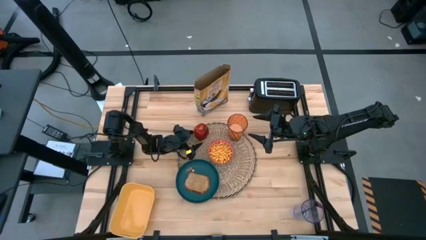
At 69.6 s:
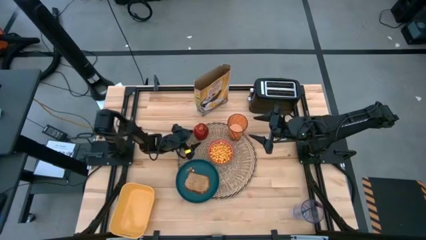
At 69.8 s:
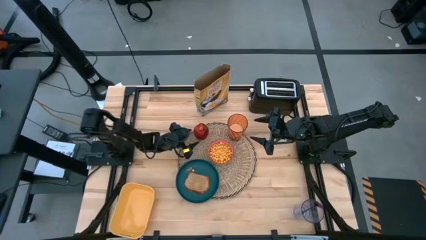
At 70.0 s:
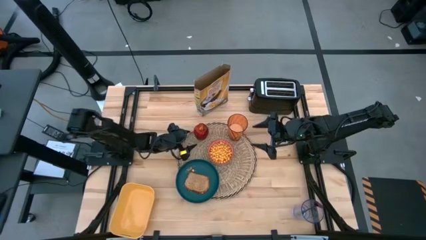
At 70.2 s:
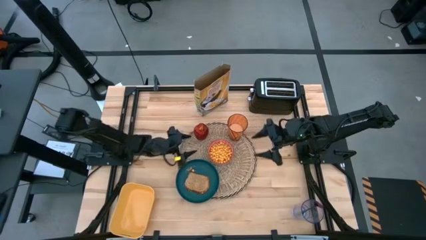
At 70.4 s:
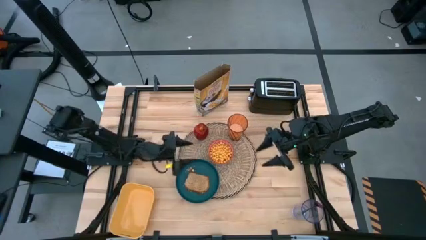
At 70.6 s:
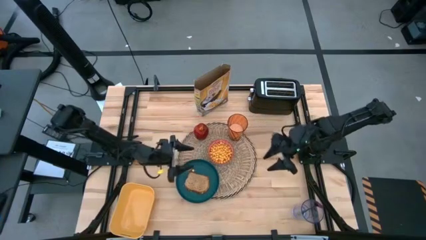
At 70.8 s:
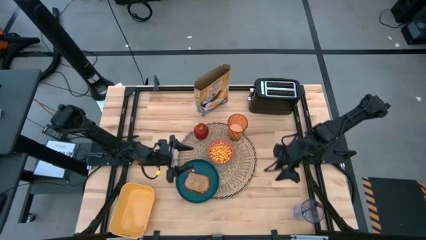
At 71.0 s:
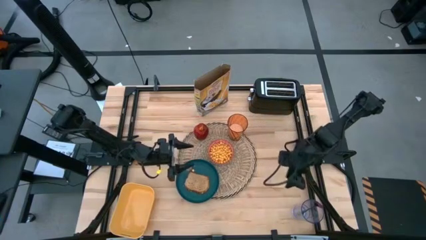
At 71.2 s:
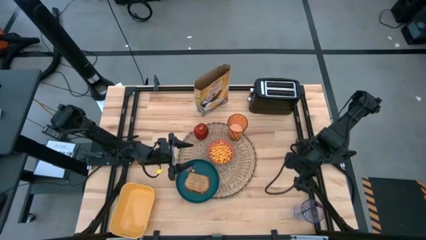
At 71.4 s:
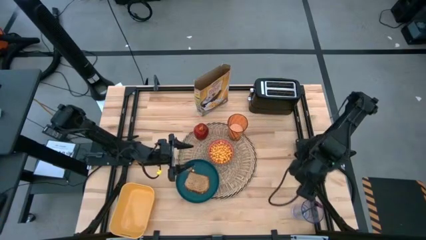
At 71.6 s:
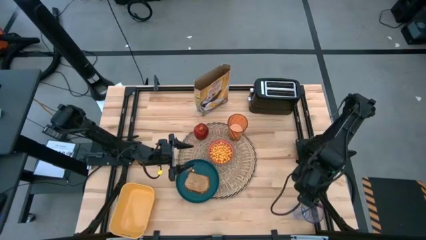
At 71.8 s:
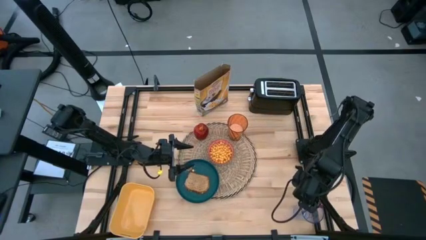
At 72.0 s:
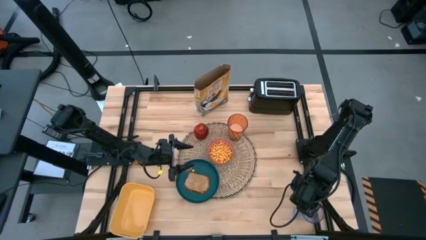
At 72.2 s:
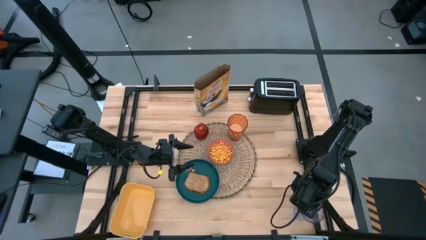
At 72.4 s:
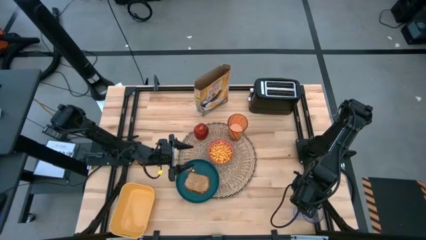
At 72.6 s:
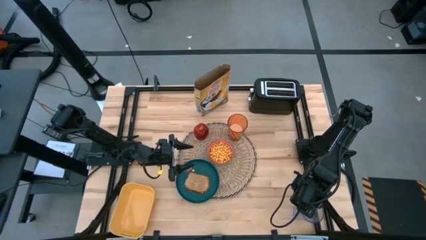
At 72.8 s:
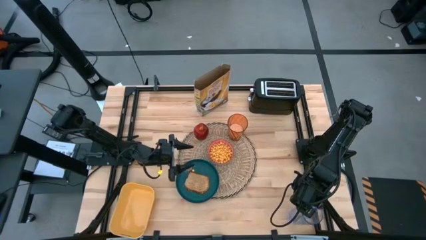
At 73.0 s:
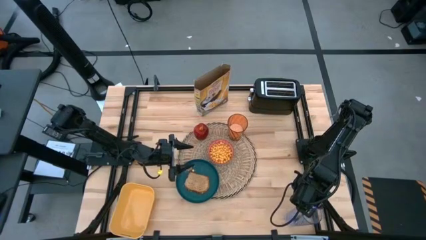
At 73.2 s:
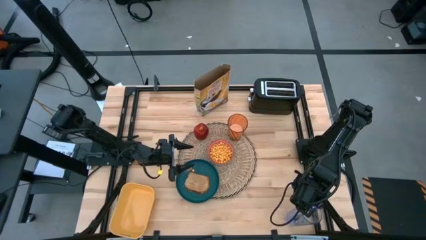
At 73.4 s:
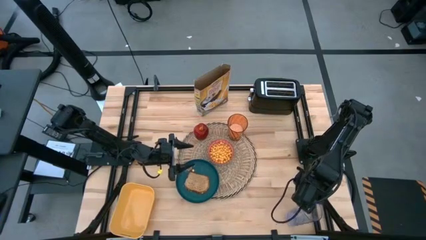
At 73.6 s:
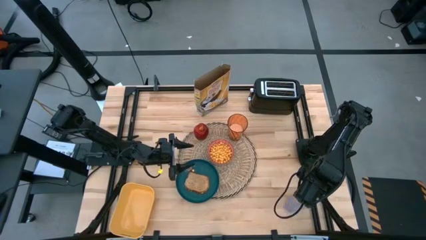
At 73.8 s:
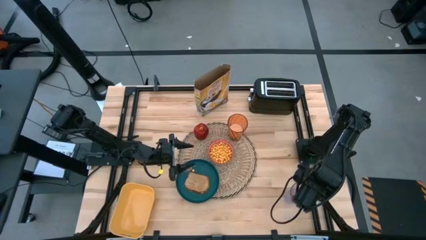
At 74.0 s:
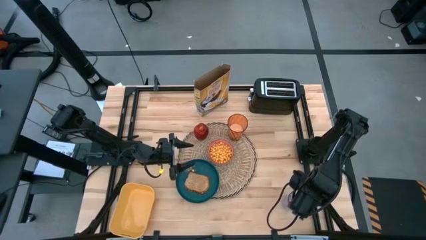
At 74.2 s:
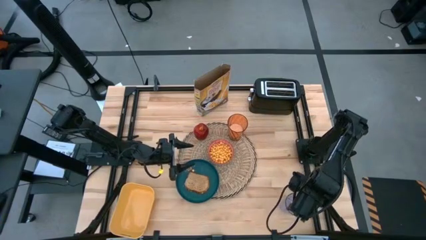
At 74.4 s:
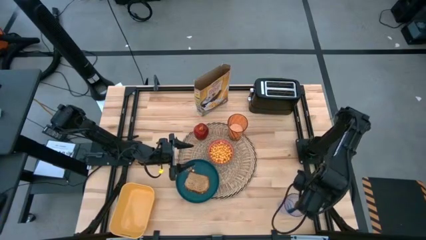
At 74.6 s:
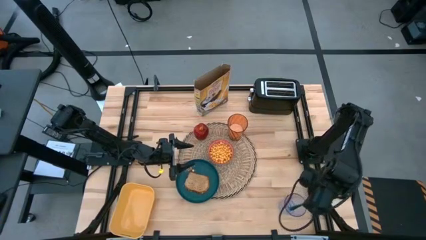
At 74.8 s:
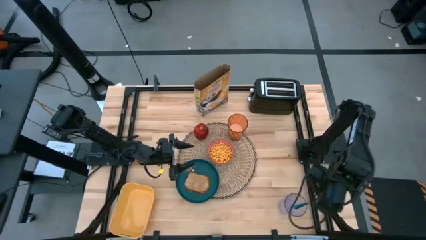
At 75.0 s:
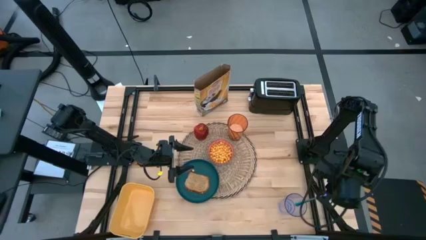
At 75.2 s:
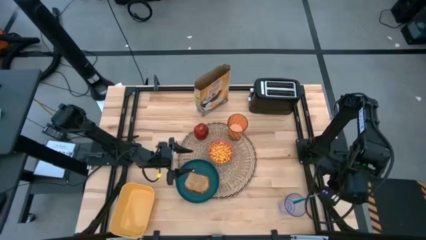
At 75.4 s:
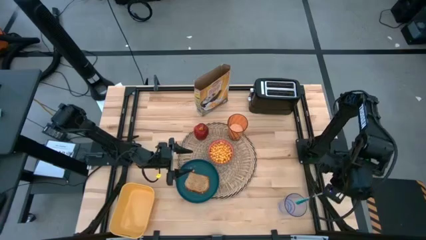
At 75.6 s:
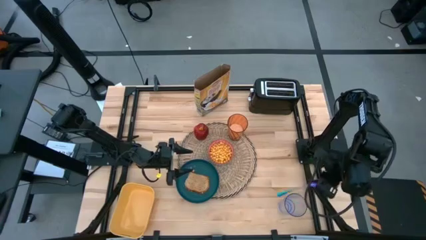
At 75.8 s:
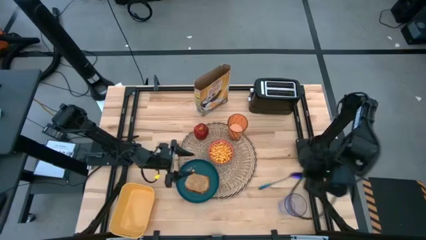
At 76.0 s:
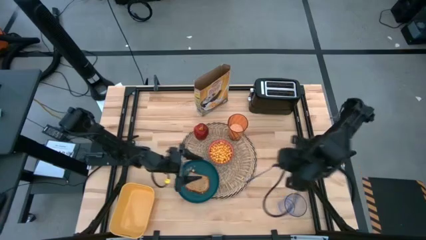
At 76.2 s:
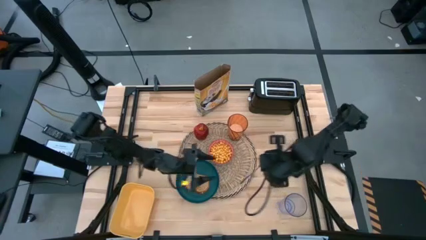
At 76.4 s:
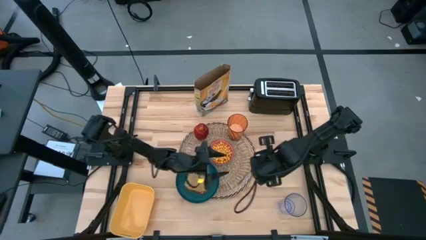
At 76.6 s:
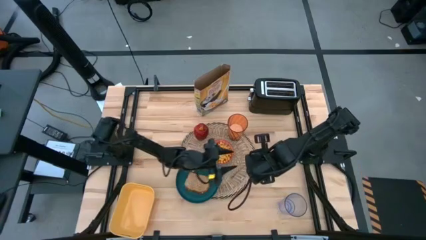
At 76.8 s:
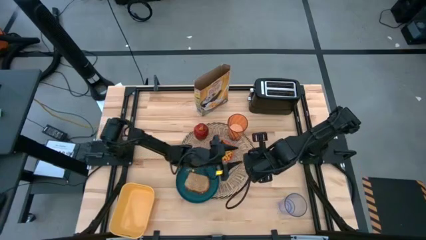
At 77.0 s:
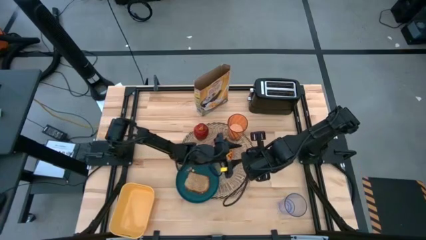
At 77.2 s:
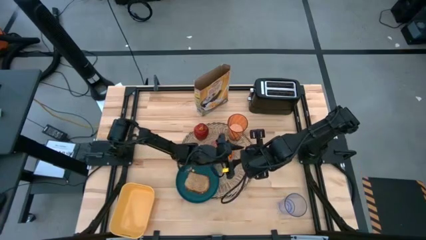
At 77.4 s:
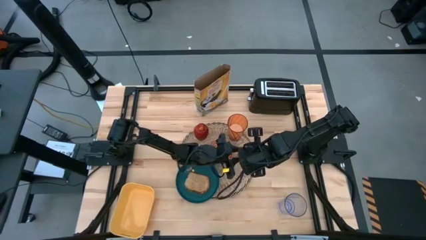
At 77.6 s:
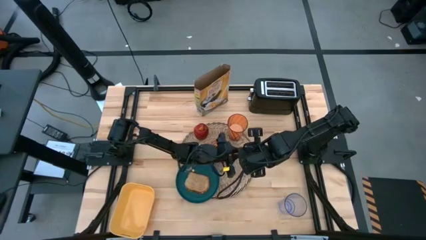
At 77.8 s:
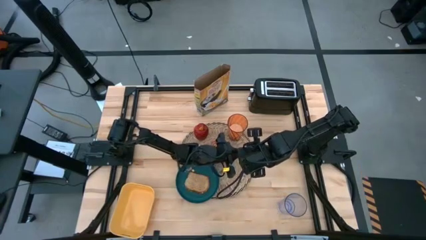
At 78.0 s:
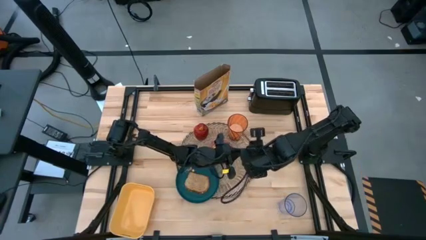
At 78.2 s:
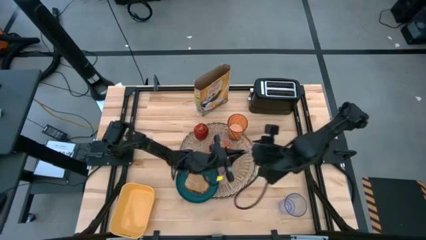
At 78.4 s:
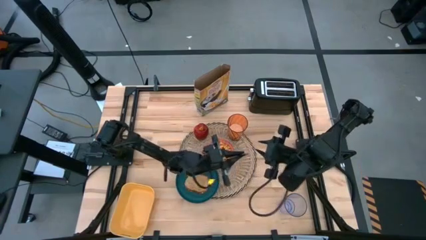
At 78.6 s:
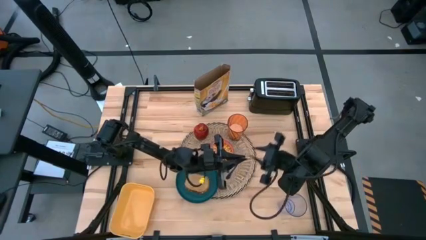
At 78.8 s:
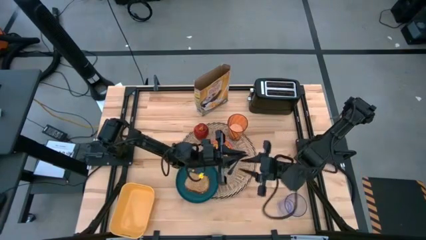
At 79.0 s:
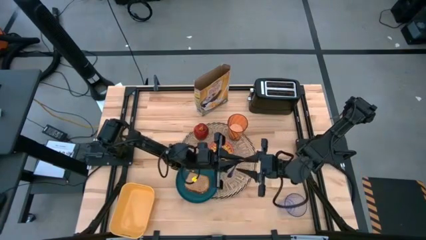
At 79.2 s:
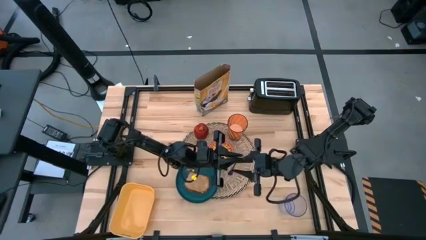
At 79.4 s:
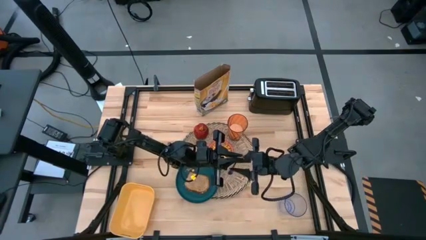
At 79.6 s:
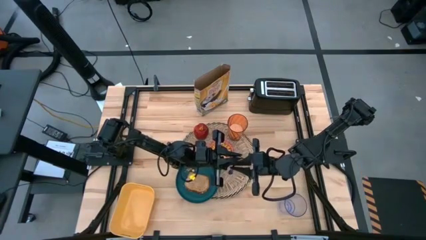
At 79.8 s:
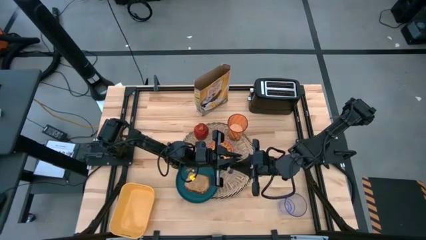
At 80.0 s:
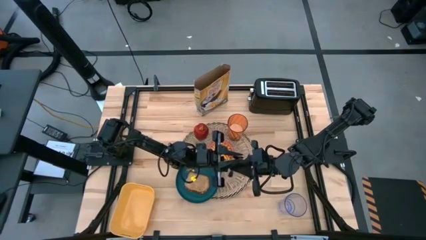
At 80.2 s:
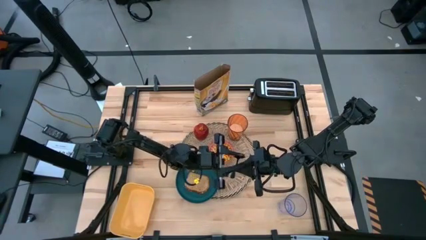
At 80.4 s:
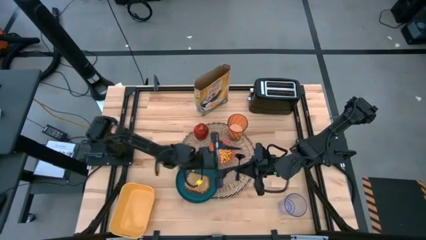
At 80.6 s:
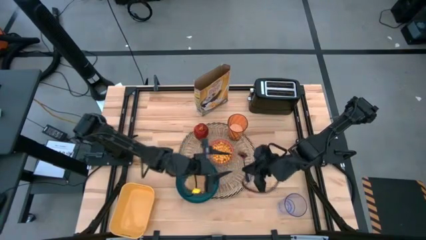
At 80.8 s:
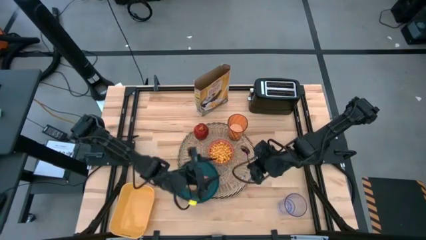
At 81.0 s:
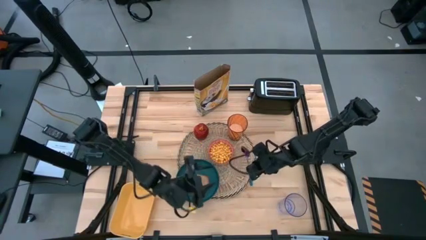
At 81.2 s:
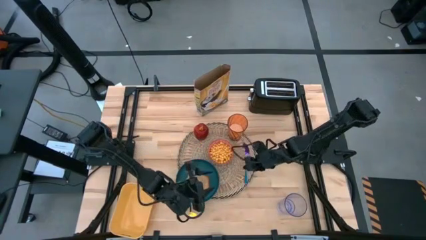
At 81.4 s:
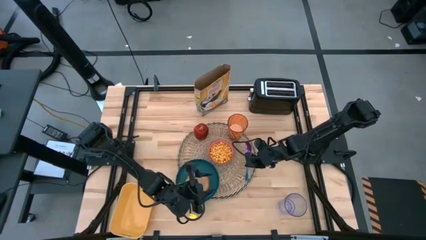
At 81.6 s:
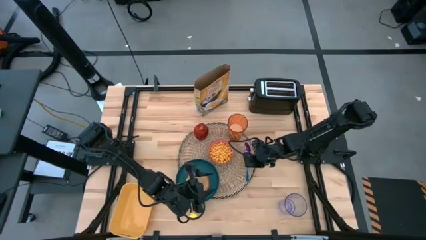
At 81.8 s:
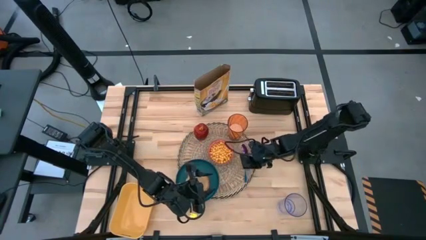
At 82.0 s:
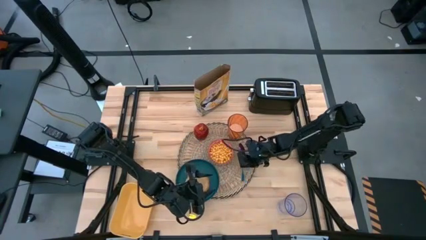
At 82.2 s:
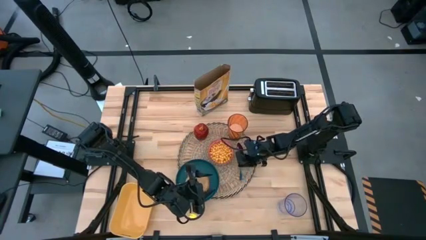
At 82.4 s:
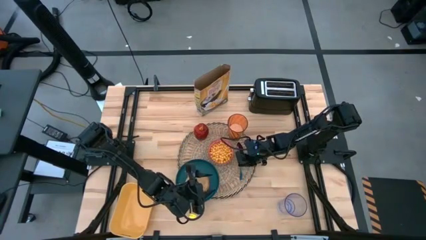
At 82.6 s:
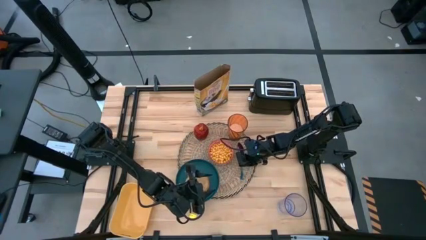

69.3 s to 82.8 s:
Task: Arrange a breakfast setting
Put the blue spoon on the brown table mat
